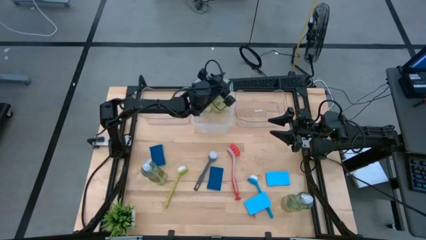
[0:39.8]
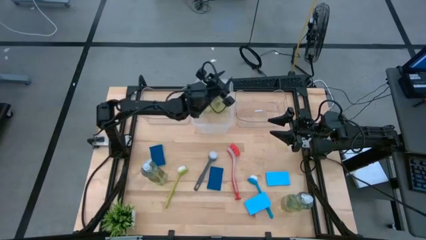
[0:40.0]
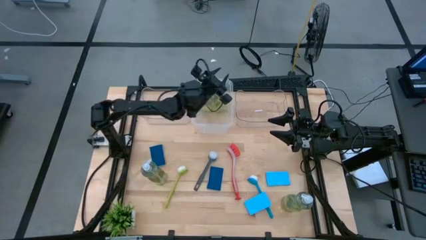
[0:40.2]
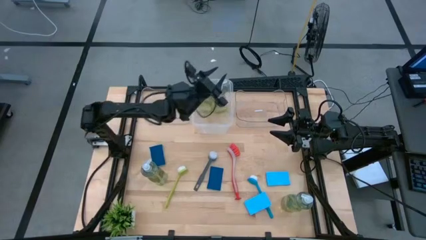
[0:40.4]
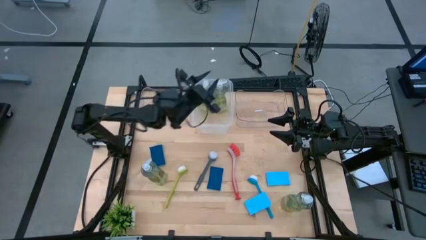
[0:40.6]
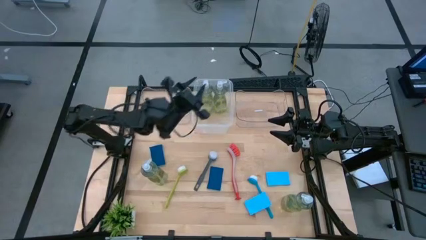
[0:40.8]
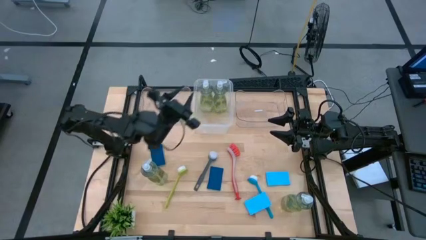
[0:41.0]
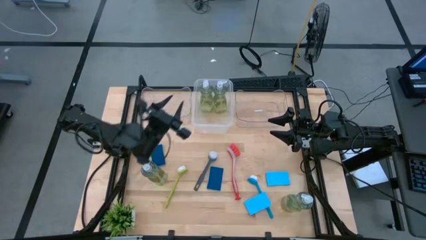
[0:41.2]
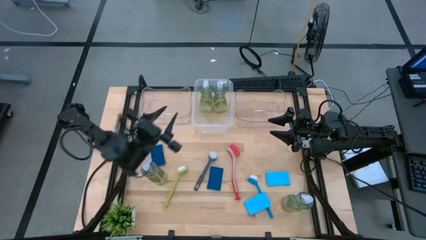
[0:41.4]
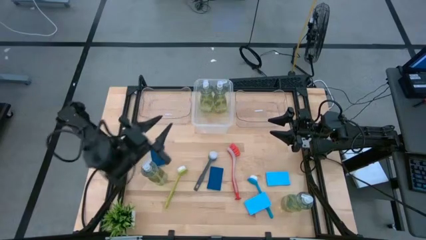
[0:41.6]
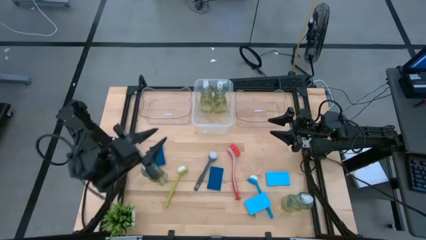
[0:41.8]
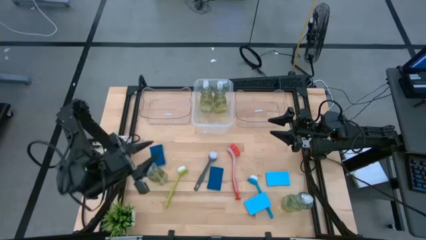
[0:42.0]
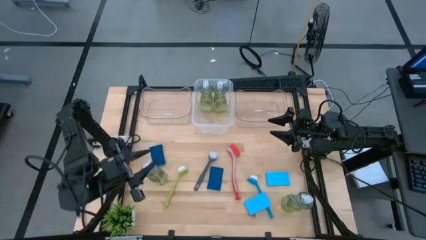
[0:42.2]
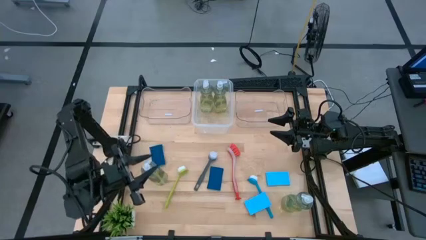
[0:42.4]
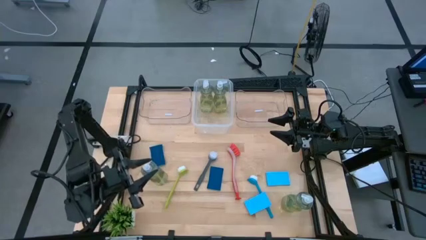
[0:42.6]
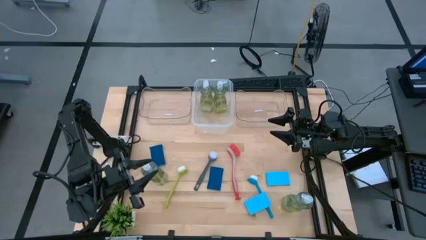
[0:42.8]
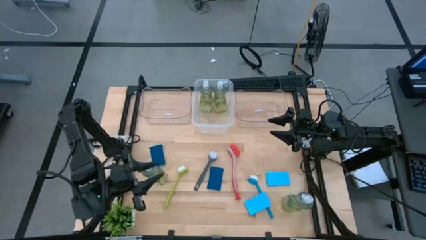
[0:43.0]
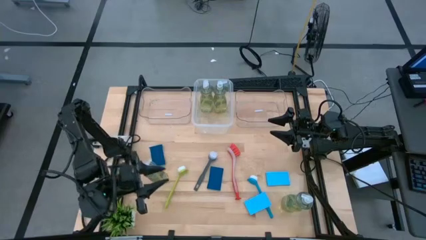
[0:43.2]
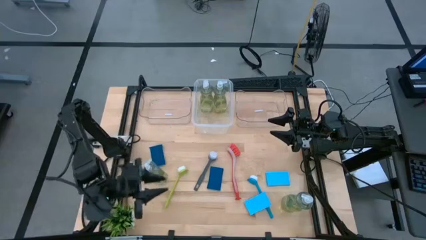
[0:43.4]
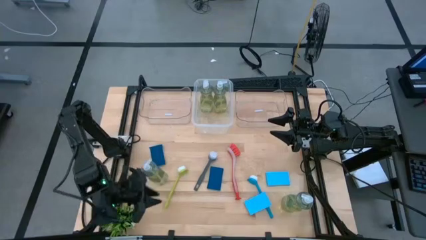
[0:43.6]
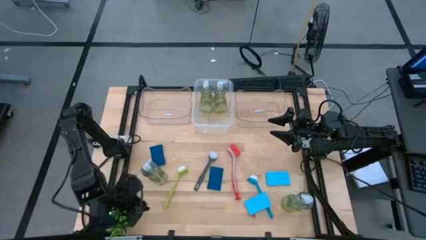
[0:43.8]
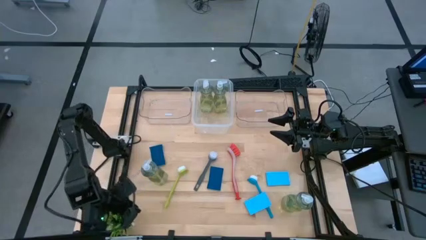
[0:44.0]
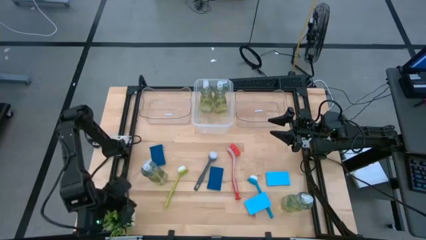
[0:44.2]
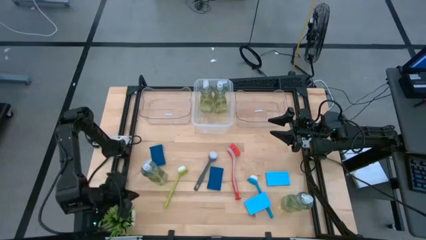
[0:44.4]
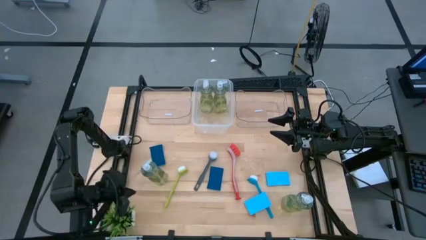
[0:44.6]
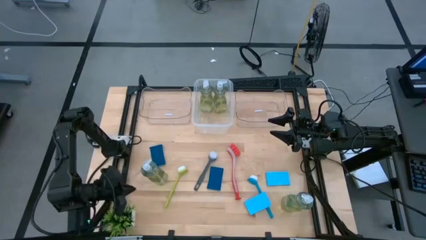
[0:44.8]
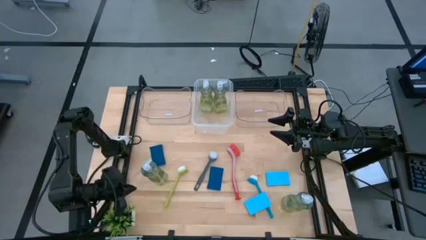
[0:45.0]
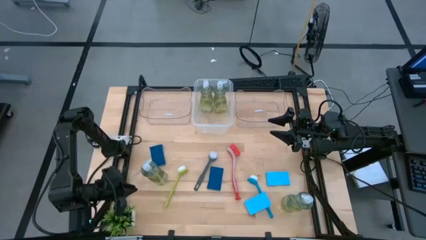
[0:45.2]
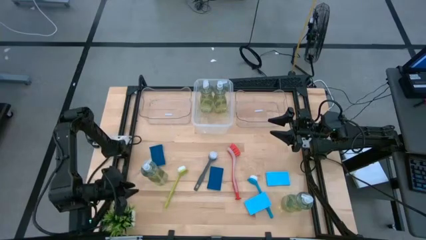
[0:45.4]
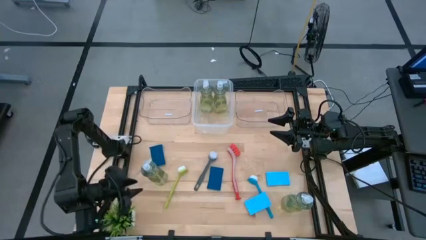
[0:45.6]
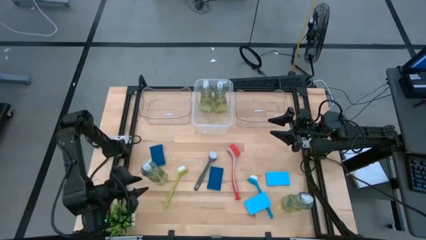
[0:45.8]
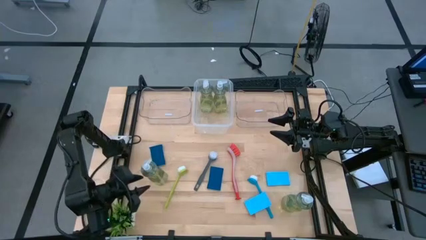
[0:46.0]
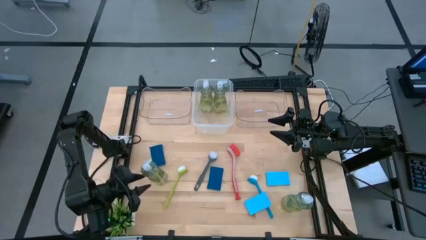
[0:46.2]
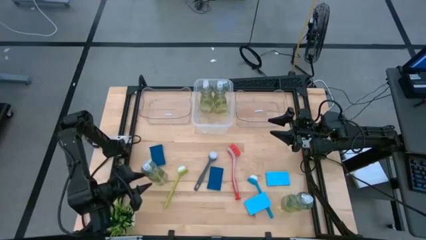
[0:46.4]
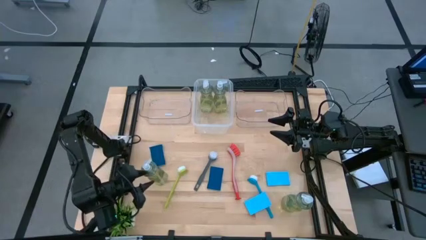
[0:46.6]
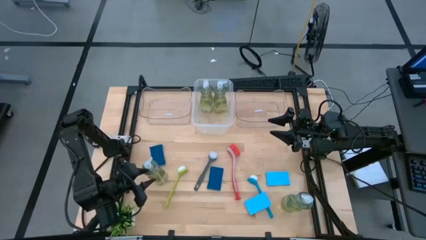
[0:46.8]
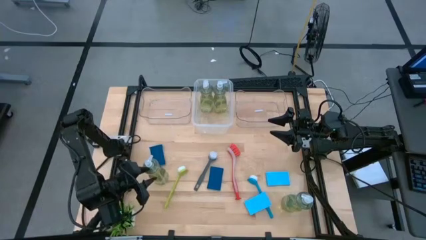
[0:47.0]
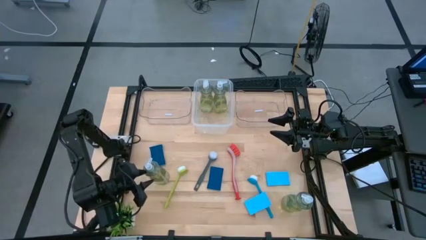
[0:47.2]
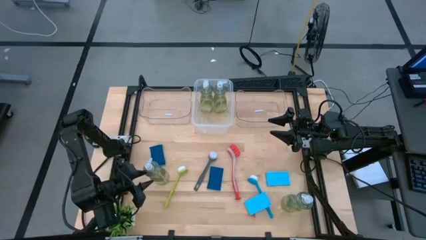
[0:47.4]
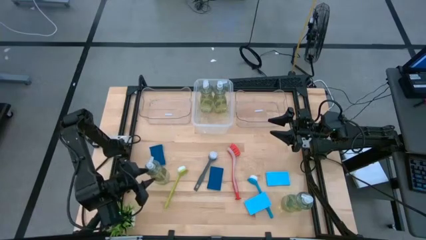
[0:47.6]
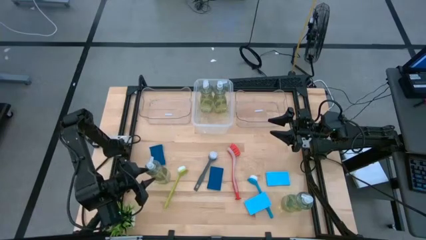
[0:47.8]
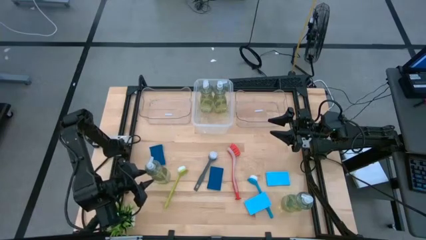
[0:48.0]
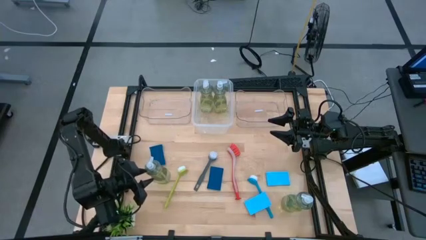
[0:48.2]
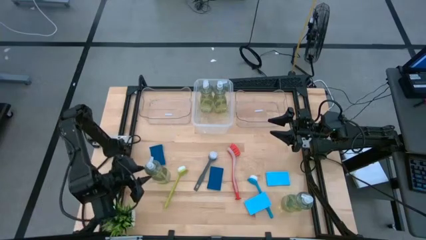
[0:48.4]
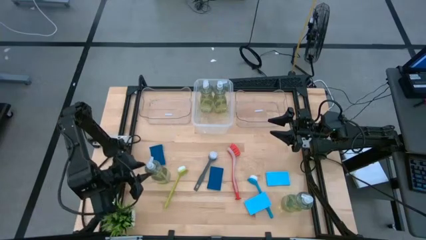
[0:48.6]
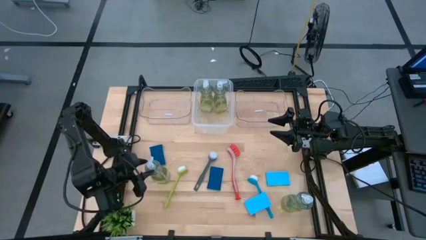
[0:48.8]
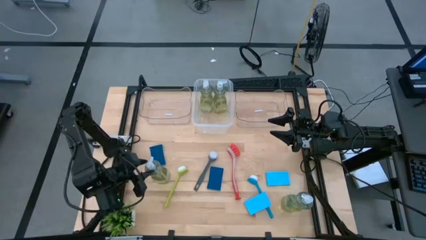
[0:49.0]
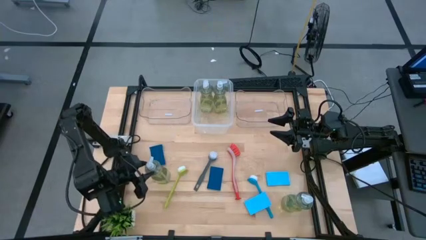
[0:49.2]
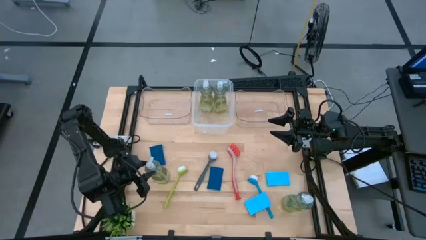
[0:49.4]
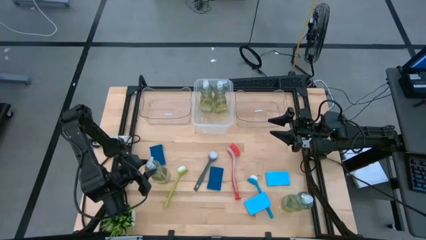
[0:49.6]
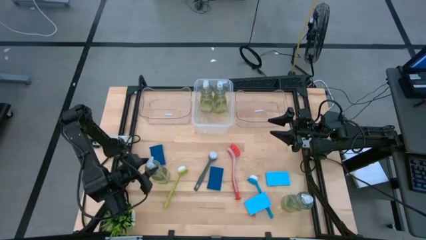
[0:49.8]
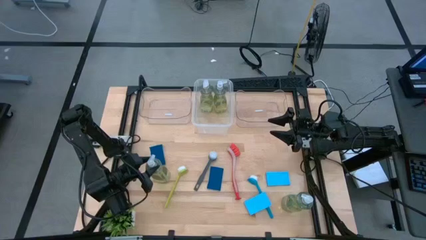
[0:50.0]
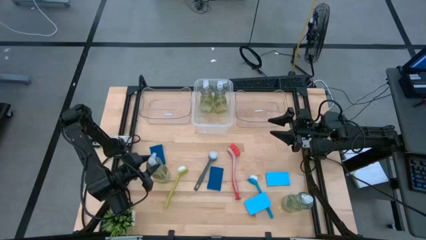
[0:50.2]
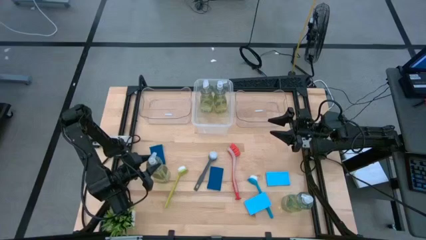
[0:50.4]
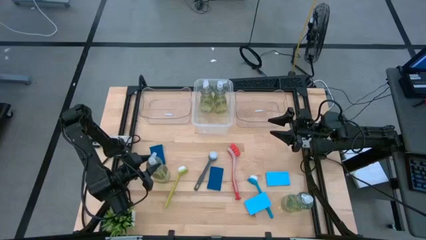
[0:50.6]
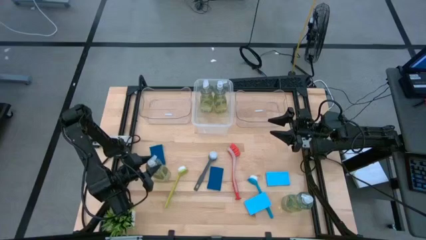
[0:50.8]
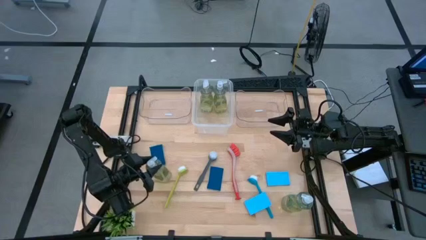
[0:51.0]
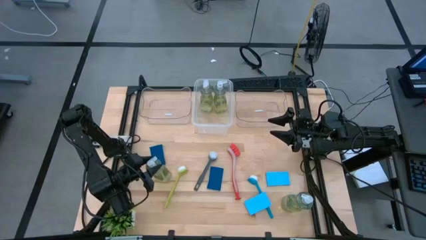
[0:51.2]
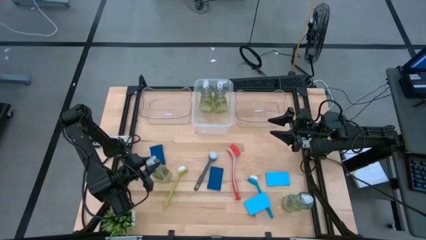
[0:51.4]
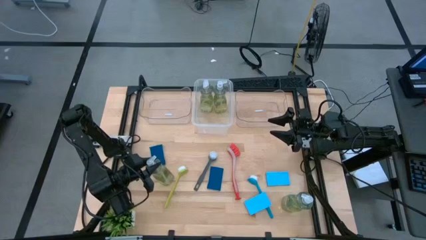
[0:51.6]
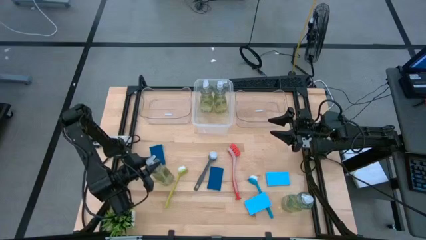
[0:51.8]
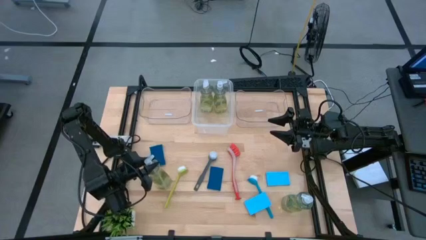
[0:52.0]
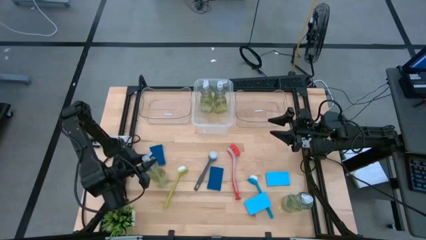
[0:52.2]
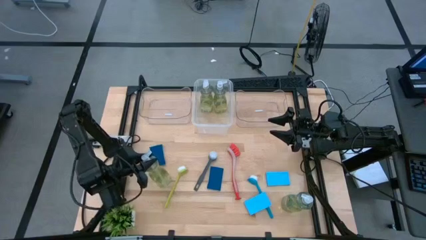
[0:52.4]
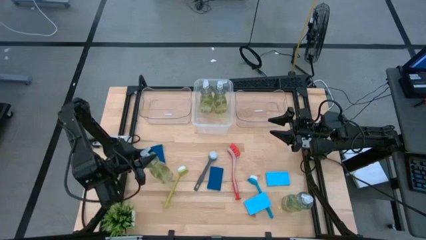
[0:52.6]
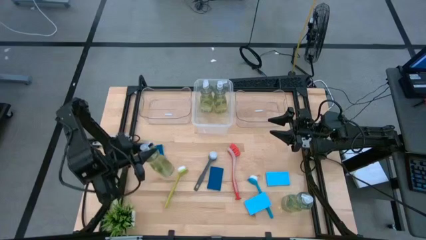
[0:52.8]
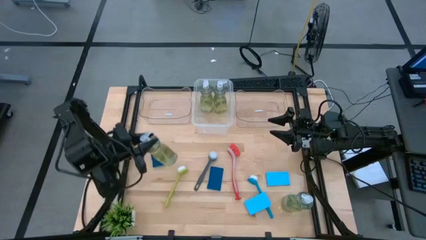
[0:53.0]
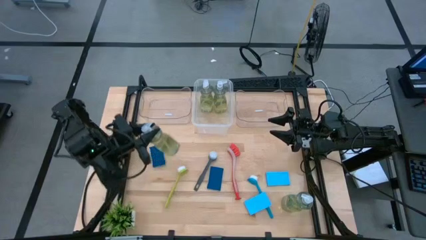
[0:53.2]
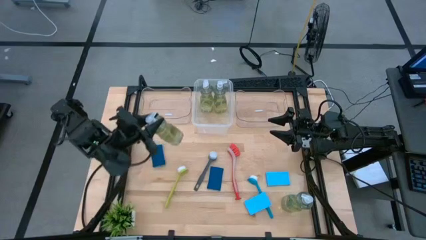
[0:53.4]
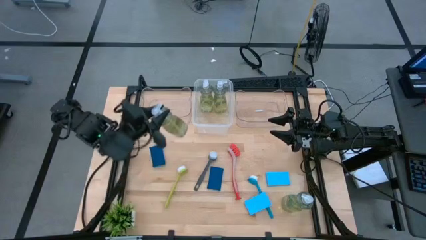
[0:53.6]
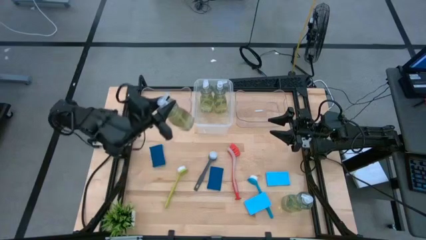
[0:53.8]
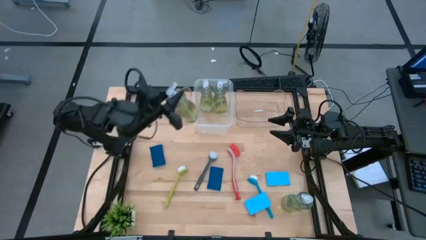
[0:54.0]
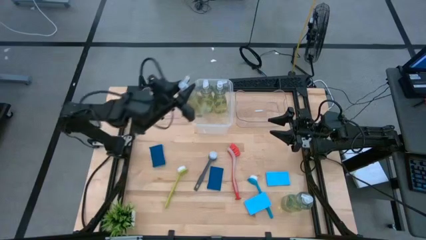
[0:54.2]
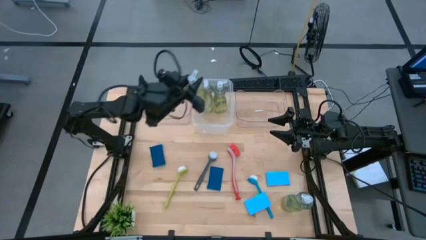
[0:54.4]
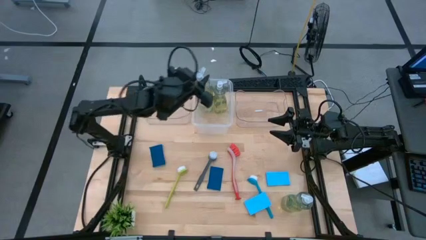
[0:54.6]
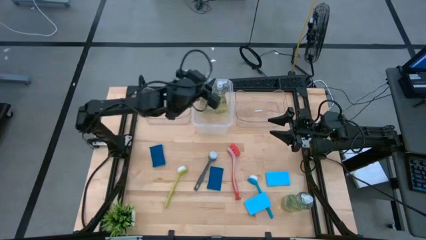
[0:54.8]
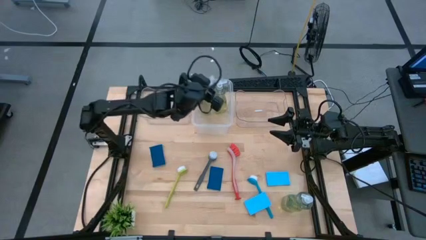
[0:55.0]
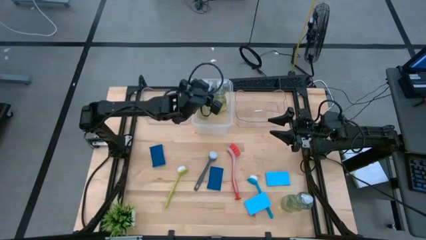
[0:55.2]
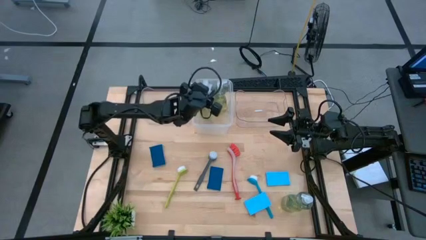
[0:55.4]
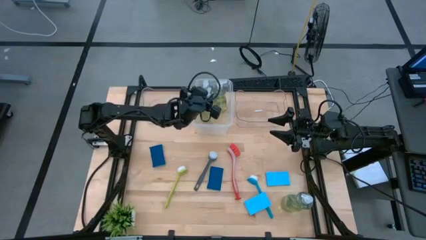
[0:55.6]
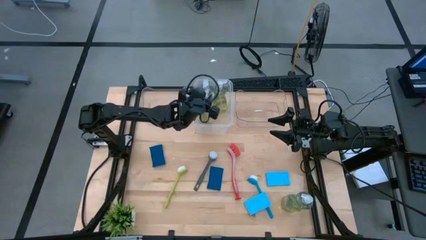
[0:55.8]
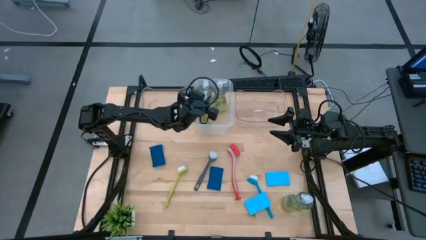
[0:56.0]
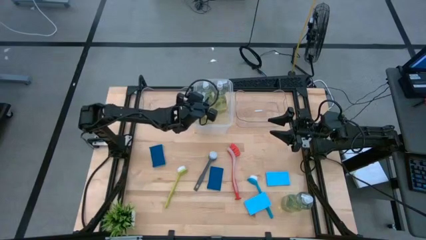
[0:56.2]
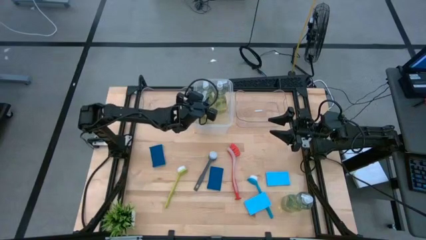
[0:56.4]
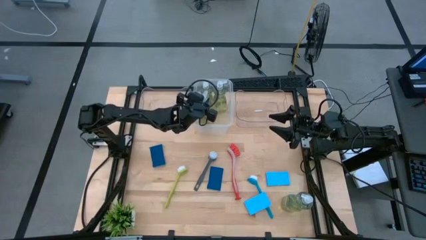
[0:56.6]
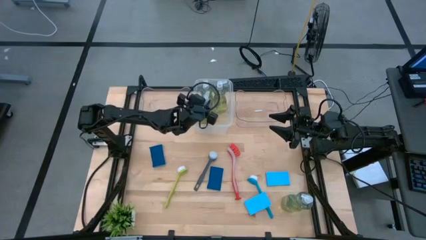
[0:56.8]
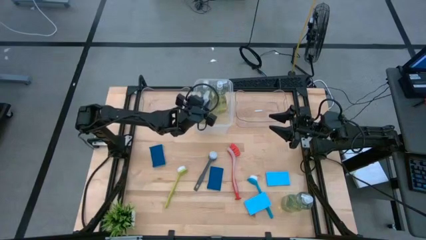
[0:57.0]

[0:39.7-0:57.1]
Task: Pick & Place Kitchen Sink Supplies
Put the green soap dispenser into the white transparent bin
